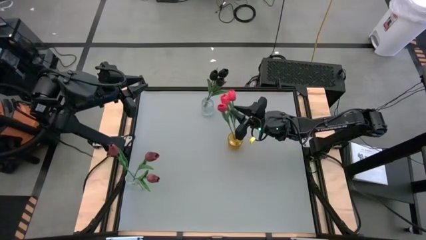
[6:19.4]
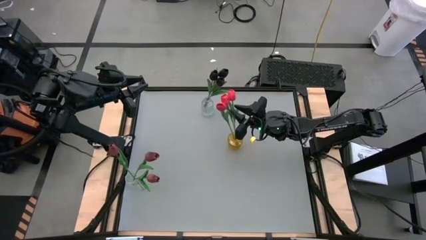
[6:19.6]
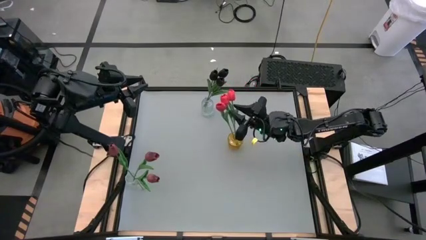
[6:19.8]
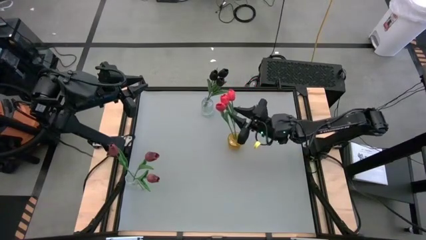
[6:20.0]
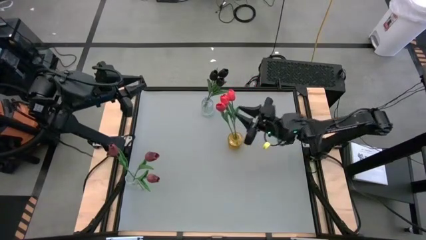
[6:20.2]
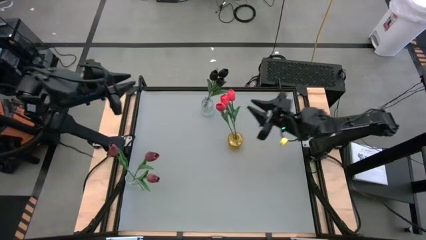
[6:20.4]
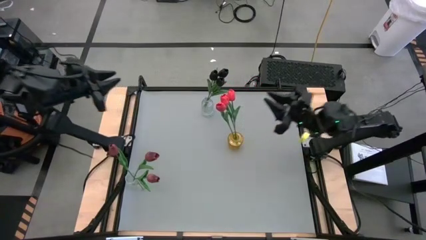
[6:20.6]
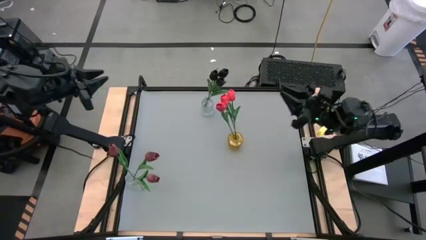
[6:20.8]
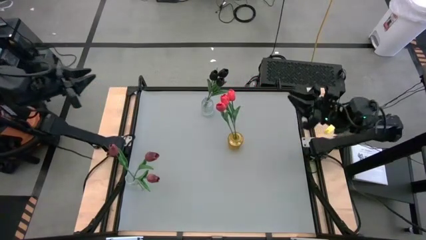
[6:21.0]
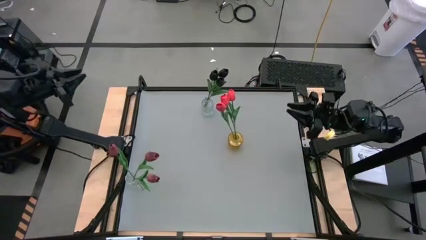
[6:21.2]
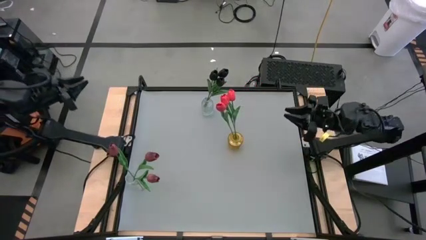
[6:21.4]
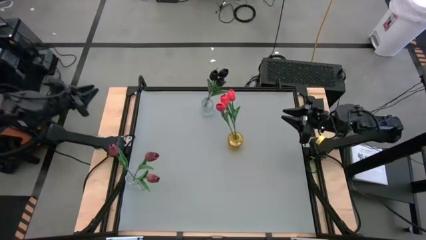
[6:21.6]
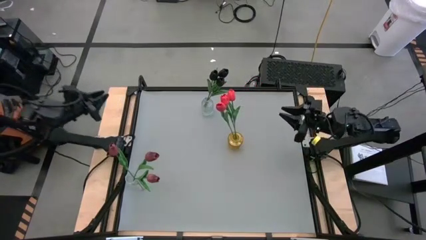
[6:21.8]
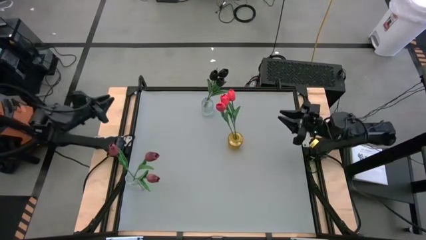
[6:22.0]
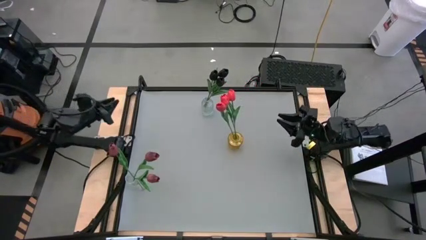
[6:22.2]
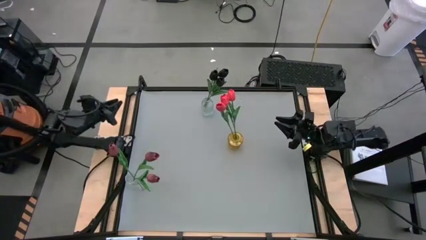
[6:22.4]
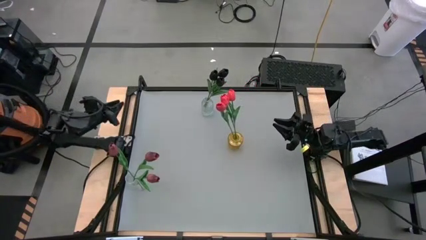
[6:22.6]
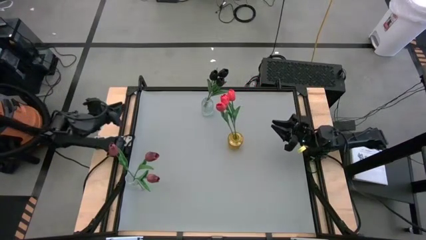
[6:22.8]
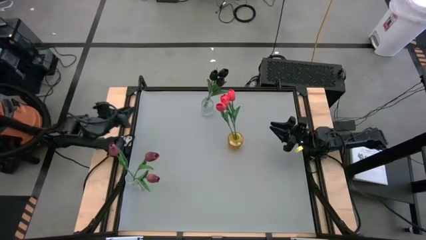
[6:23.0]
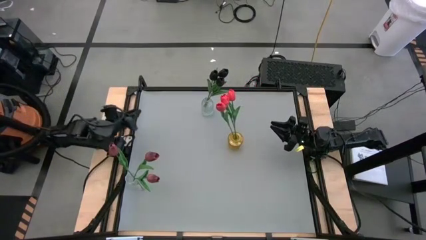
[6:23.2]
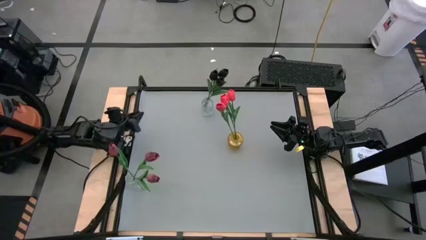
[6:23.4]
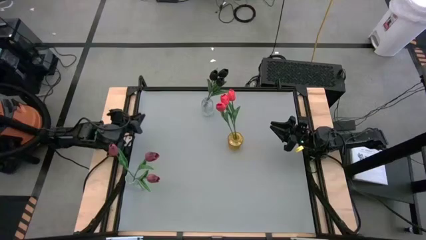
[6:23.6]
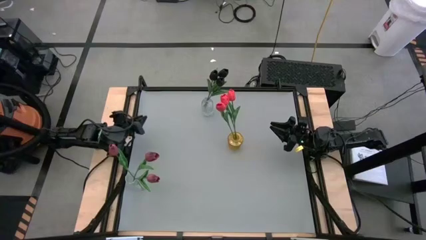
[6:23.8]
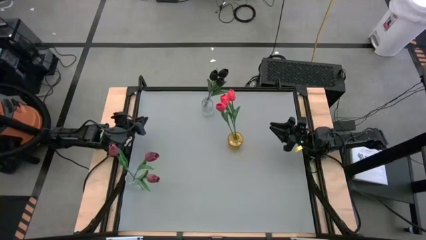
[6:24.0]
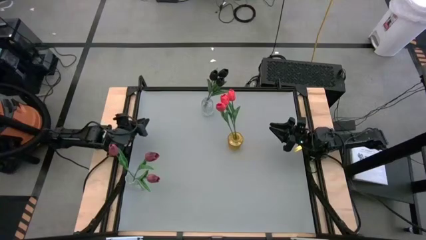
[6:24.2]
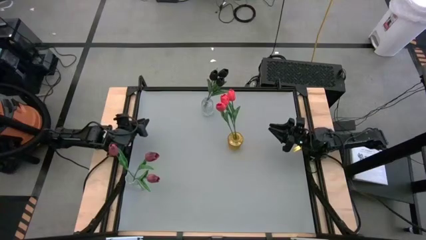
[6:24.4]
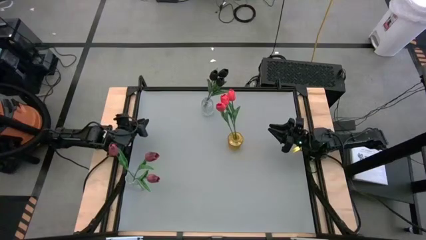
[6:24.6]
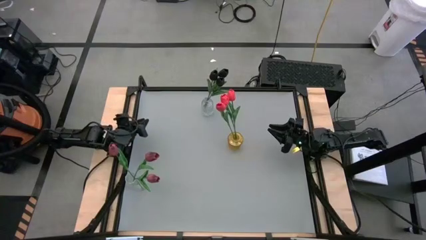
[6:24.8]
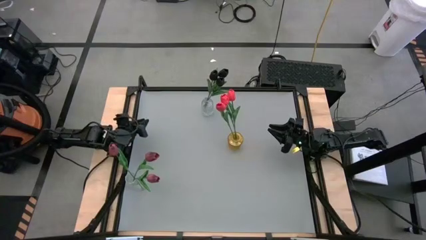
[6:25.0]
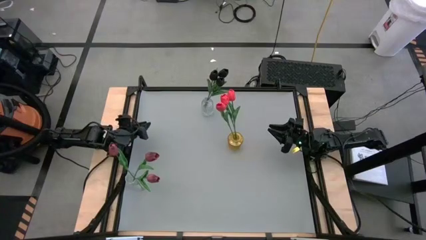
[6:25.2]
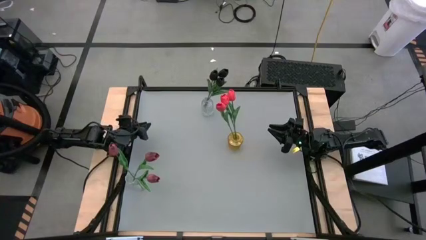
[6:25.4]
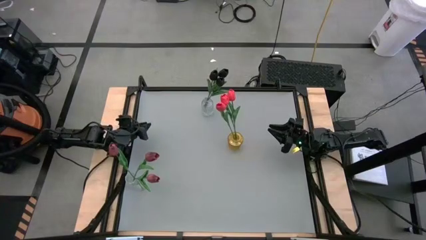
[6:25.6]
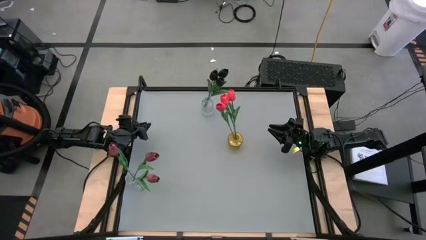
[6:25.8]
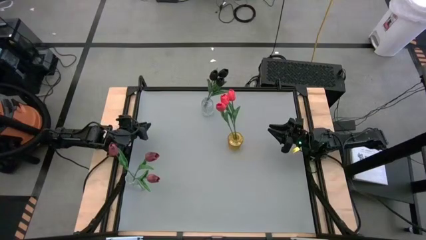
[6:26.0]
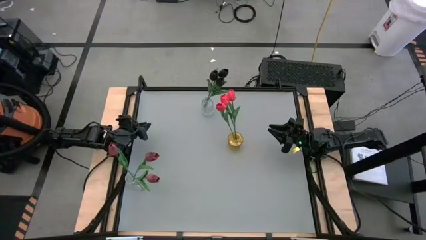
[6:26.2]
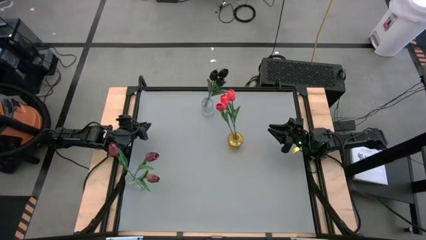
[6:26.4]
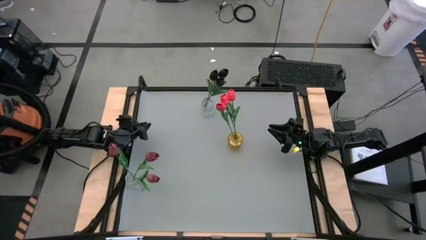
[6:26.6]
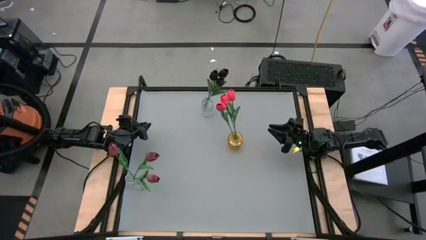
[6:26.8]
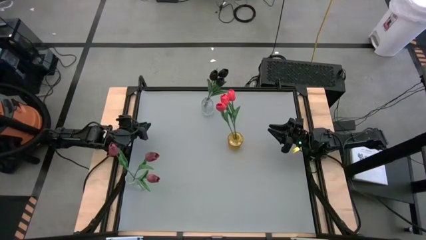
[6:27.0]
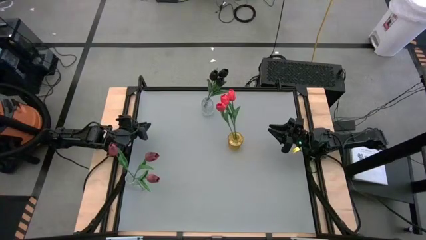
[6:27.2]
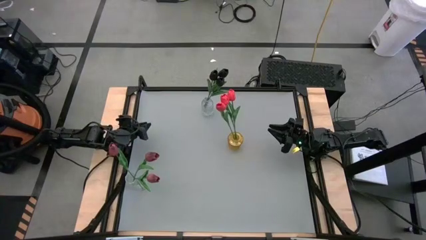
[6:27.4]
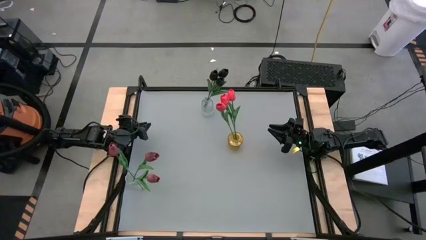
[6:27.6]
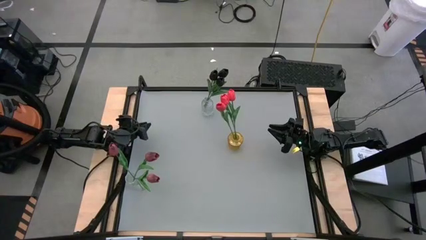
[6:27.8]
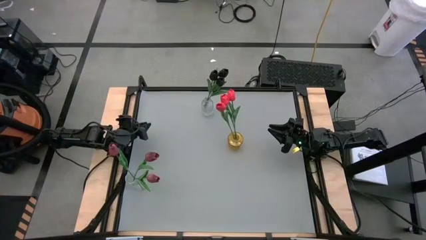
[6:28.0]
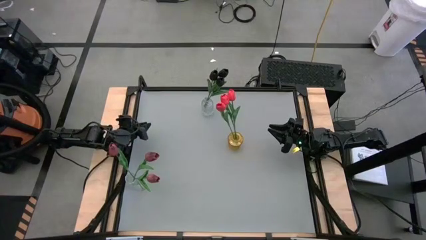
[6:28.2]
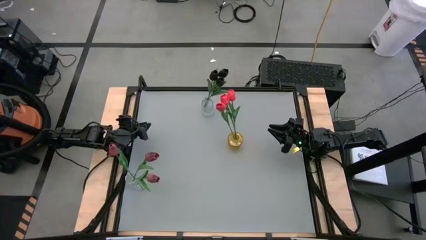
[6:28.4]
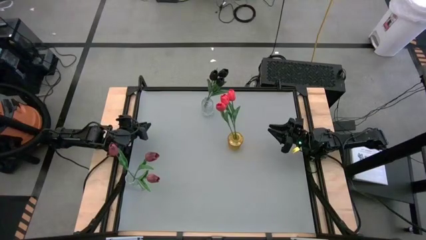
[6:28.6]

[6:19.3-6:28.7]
Task: Sort flowers into vase by color
Return to Home Position

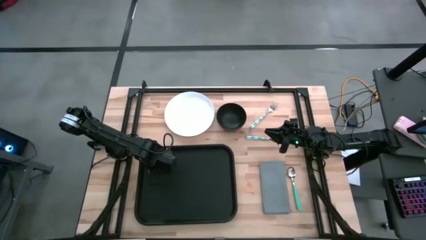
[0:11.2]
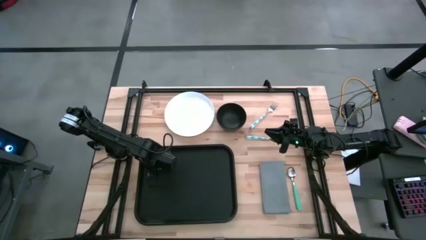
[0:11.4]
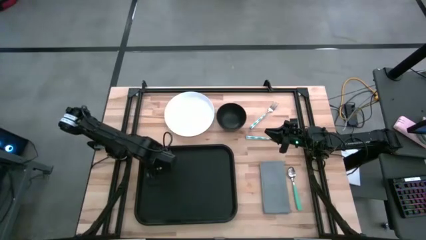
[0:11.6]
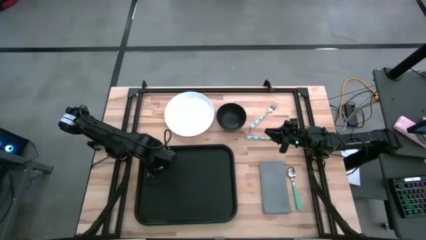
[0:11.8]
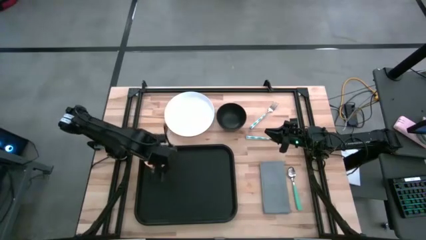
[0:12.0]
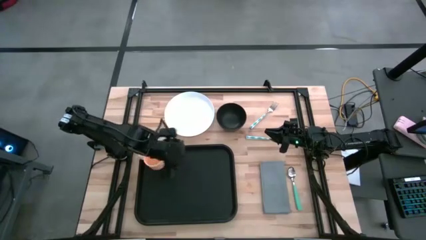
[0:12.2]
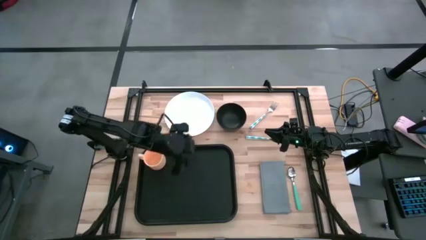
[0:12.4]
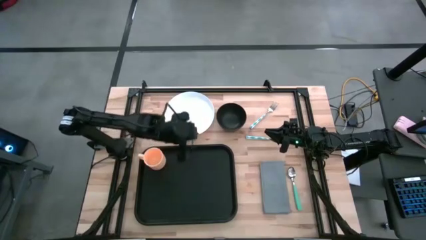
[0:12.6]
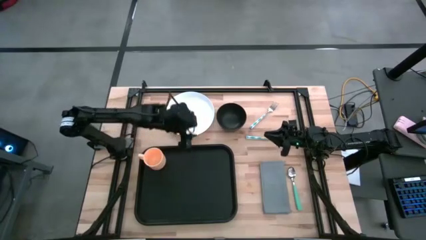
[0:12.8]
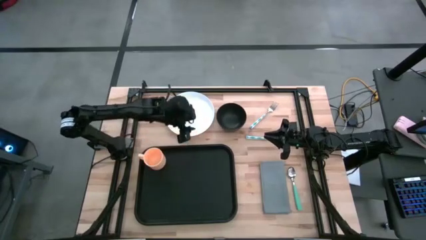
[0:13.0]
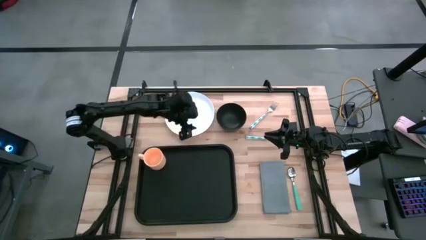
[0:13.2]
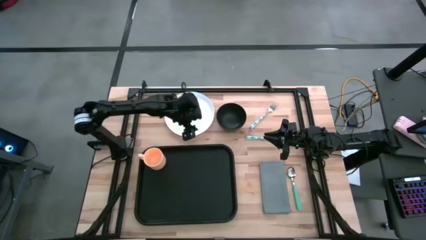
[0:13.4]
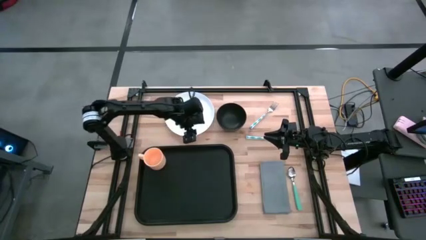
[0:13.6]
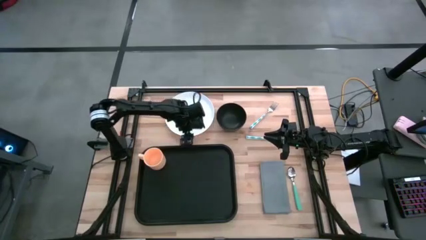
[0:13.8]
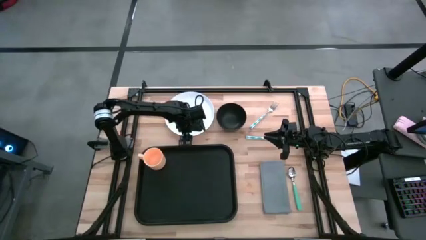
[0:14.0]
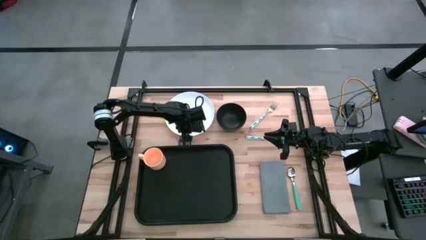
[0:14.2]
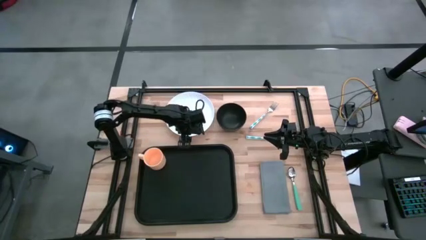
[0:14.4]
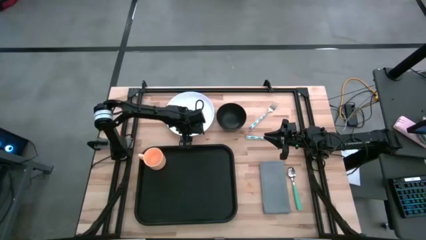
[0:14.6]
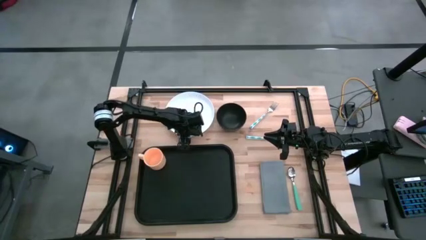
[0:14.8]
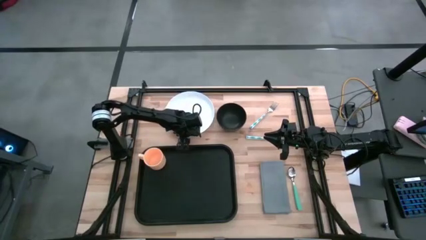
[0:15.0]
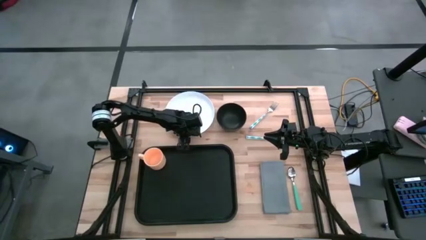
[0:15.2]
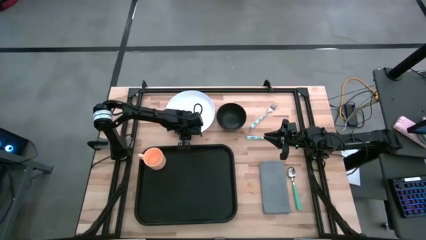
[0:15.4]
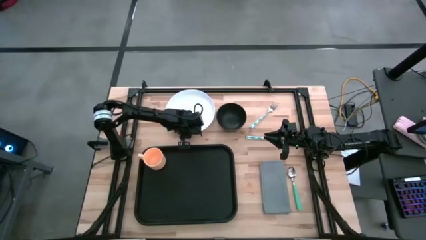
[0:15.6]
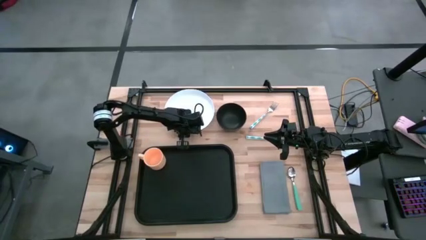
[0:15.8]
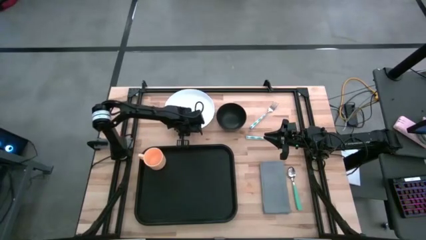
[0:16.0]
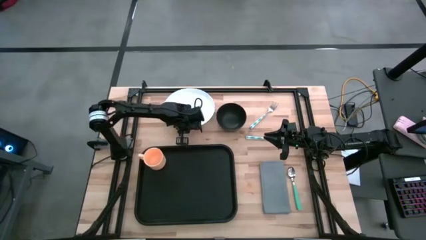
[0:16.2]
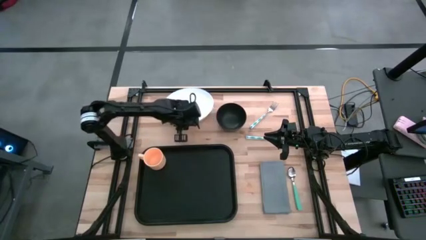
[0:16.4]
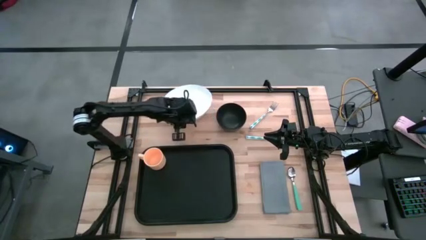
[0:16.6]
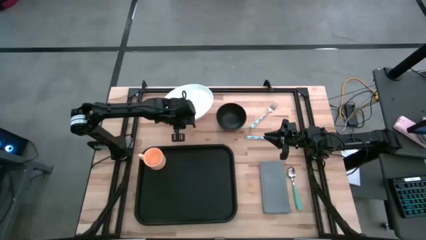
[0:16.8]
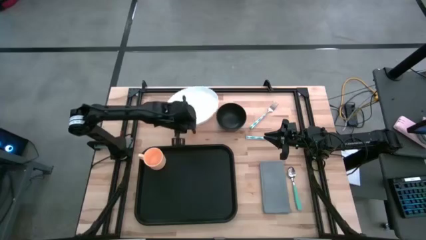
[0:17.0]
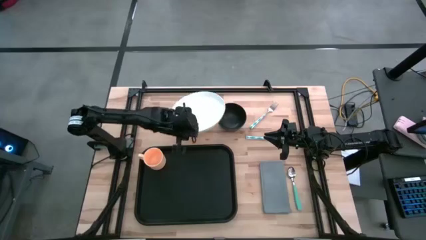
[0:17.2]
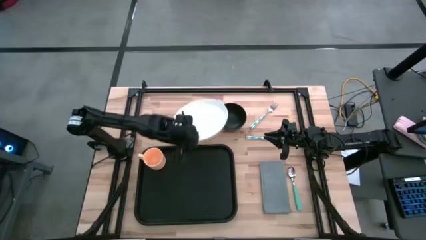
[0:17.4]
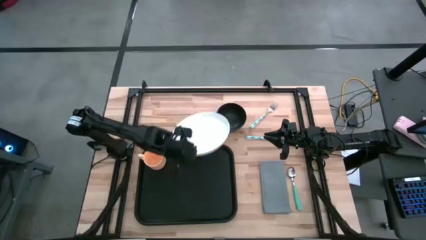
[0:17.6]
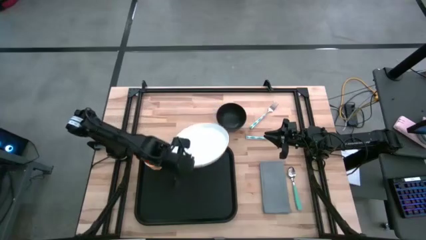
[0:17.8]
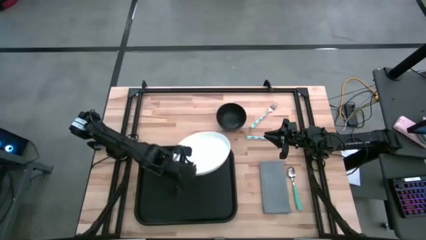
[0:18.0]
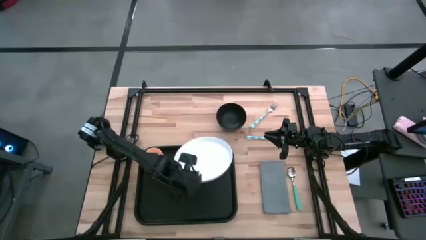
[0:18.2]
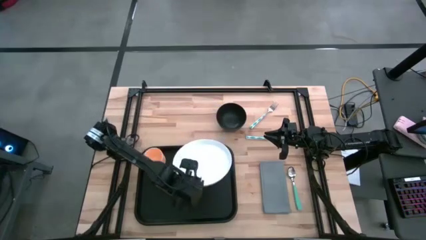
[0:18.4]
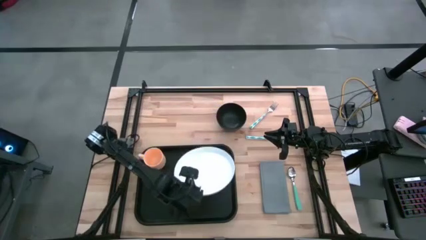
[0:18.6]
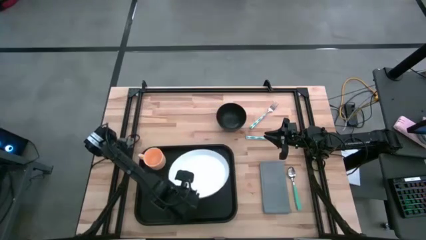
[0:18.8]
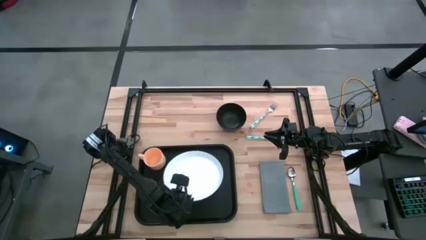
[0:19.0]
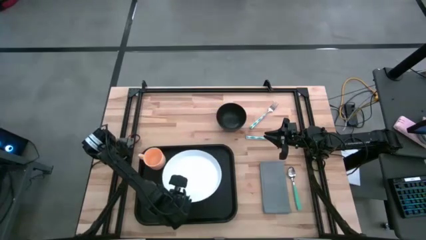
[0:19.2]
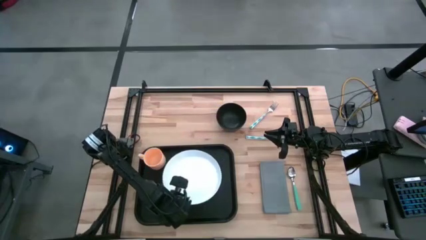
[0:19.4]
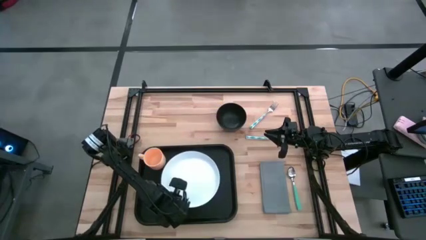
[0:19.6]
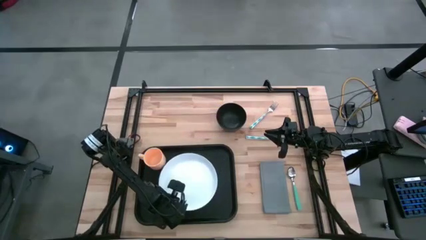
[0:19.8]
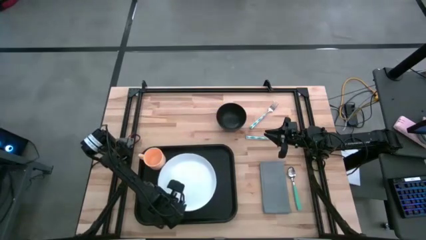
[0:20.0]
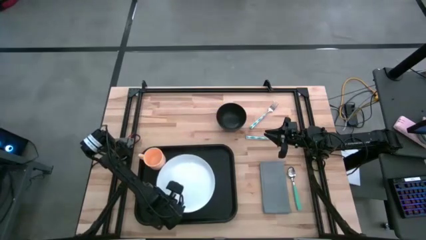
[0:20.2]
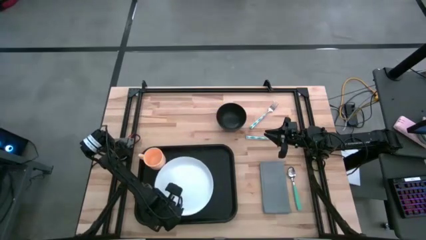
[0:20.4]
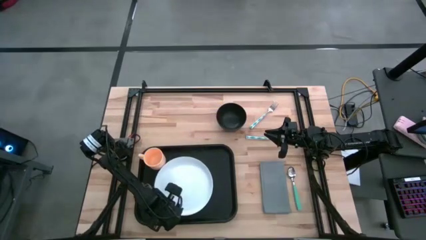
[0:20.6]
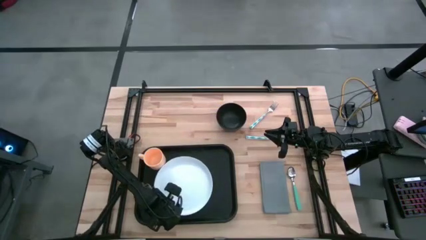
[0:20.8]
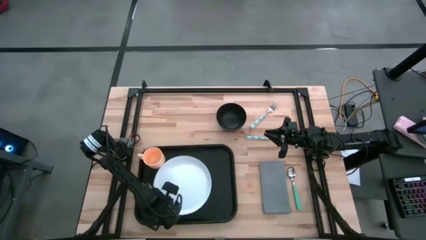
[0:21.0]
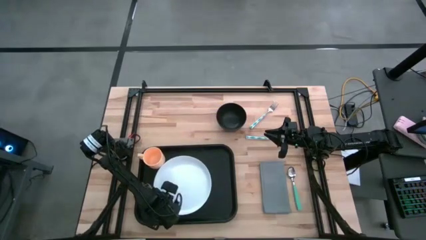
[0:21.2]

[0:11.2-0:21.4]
Task: Set up tray
Put the white plate on the black serving tray to the bottom right of the orange cup
